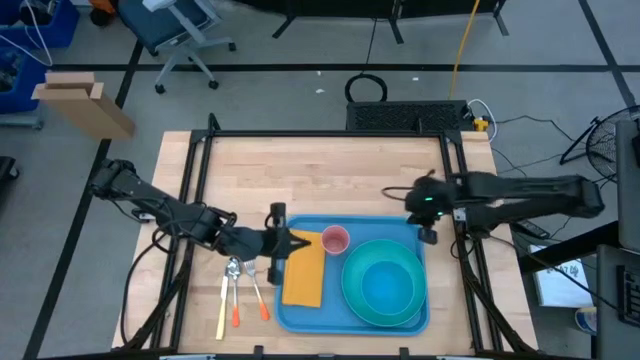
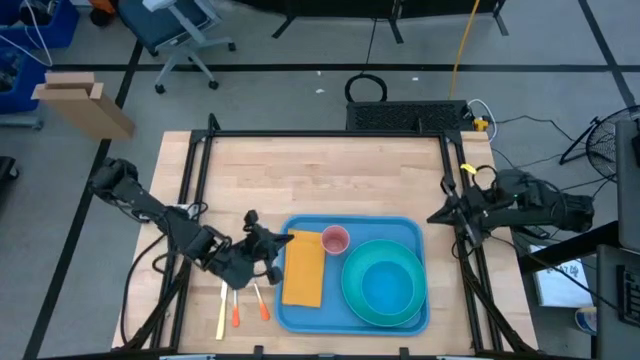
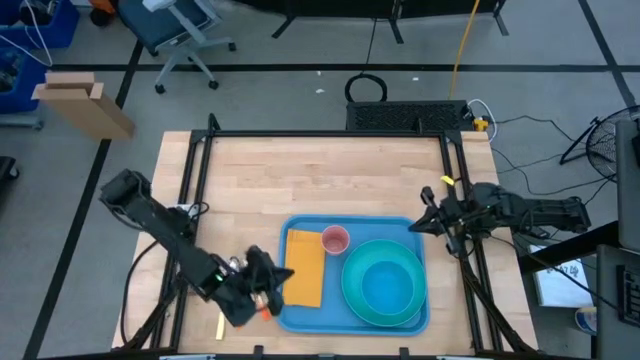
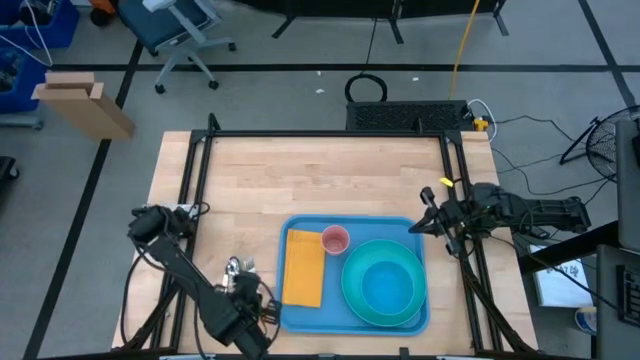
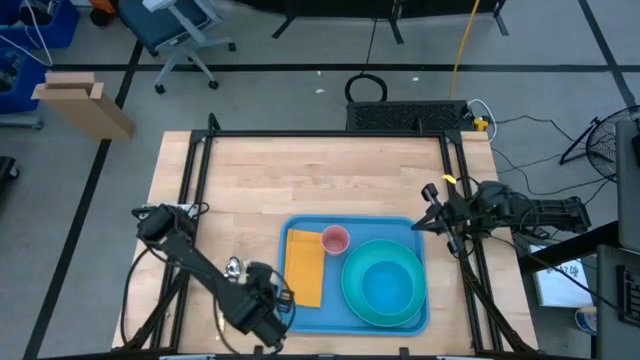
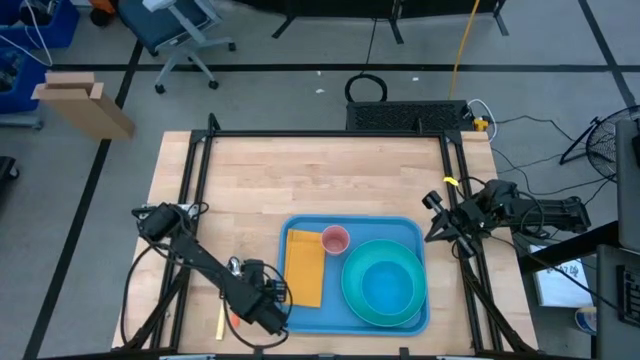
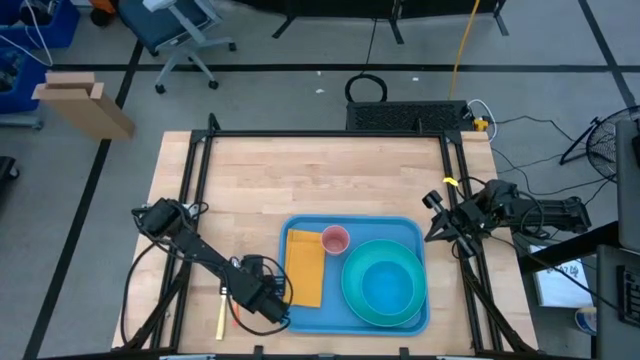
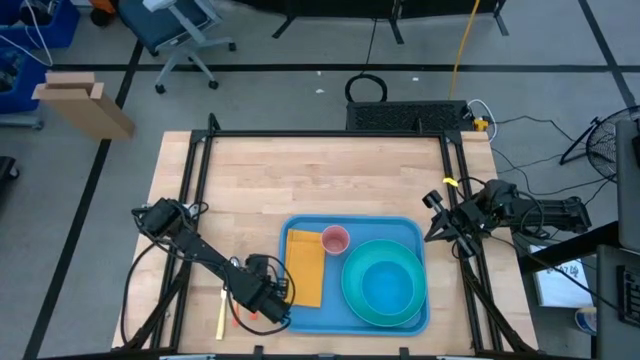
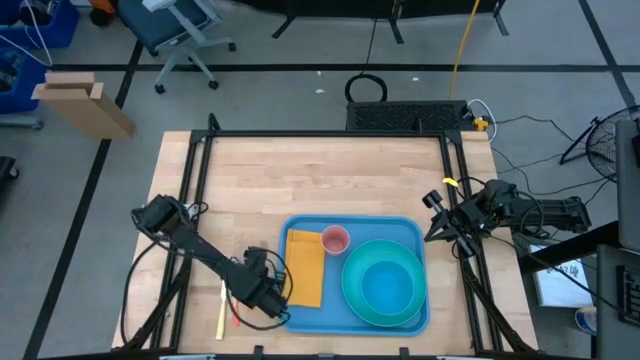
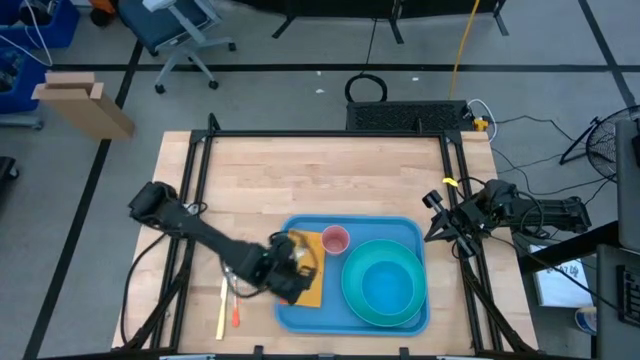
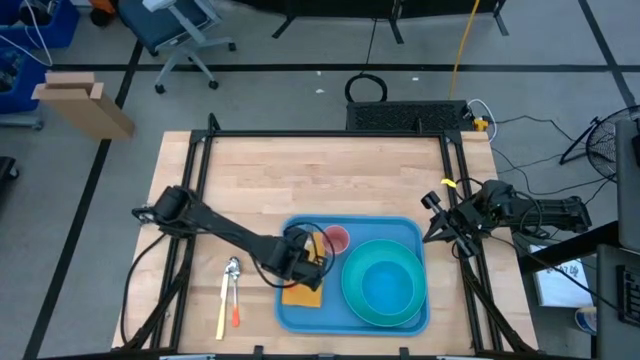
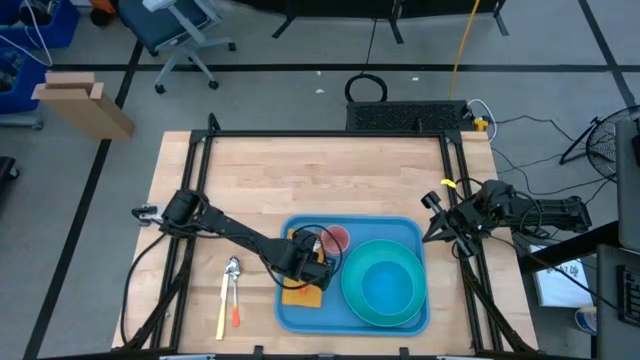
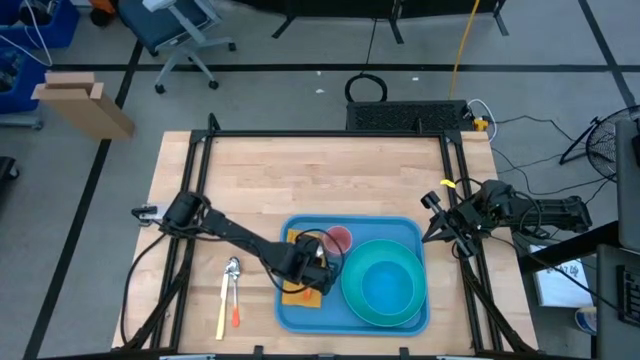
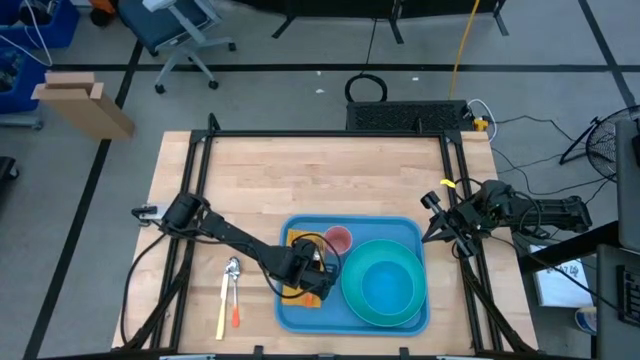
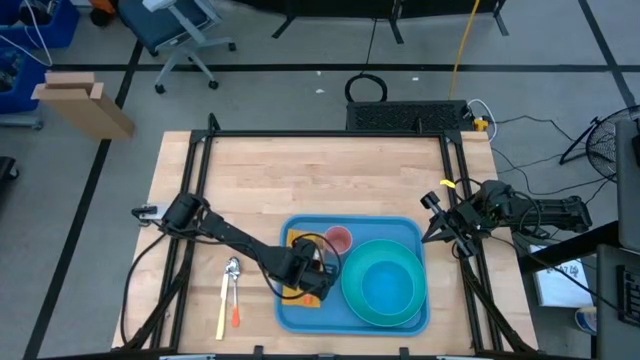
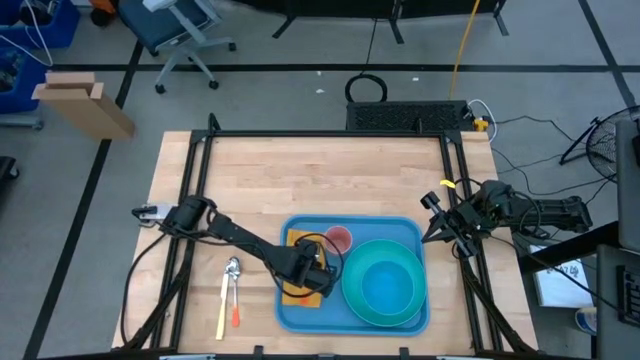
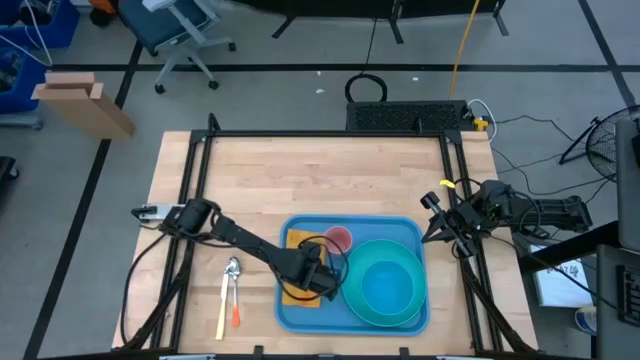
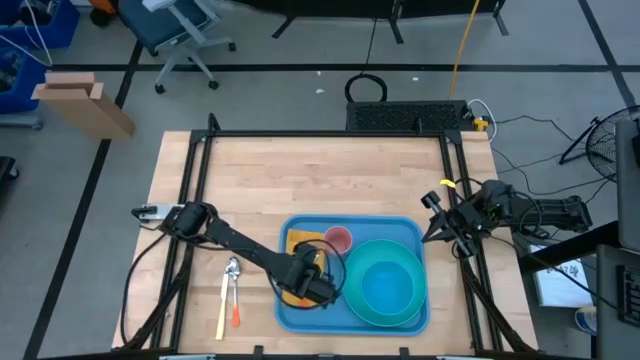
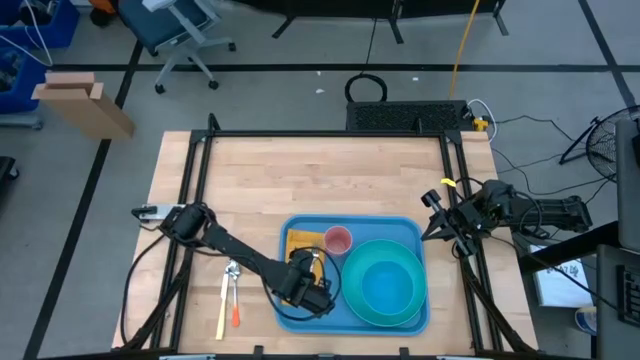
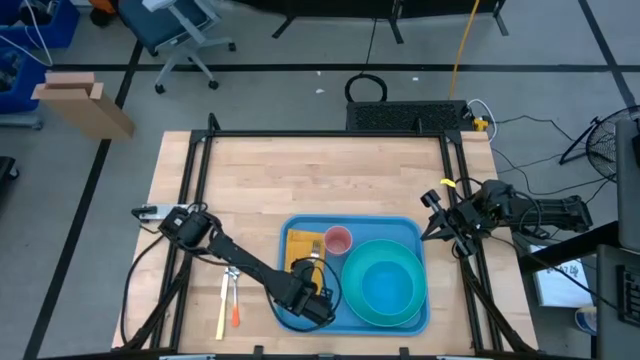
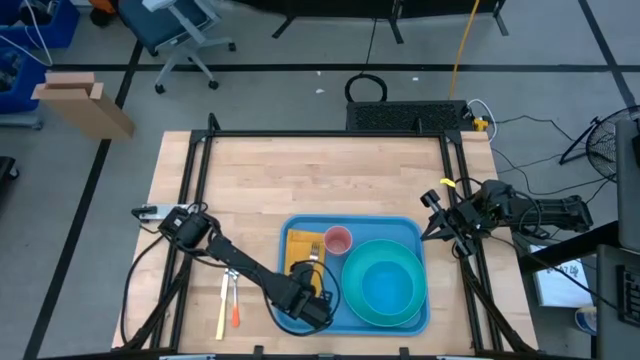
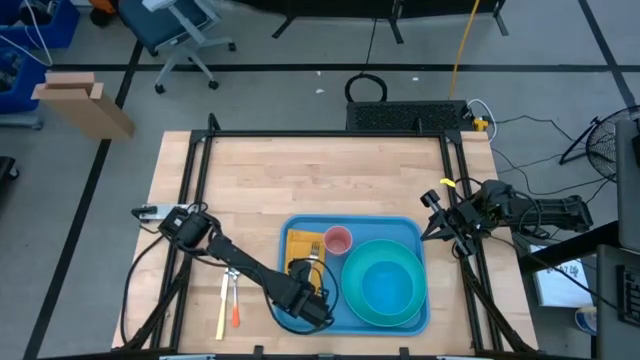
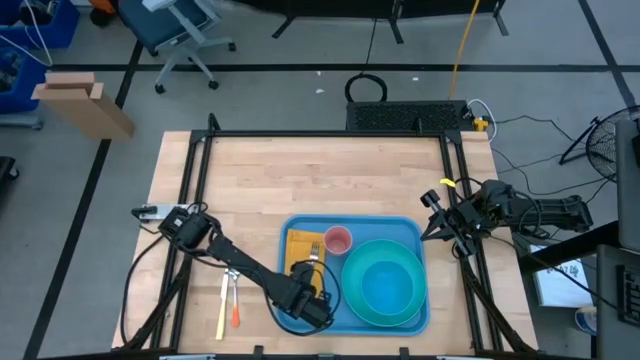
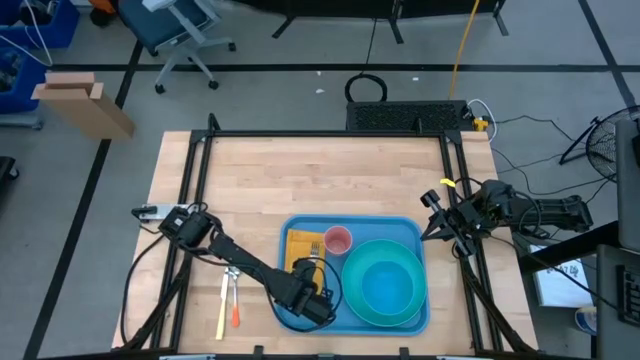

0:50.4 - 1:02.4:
Task: Set up tray
Put the orange fork on the yellow napkin

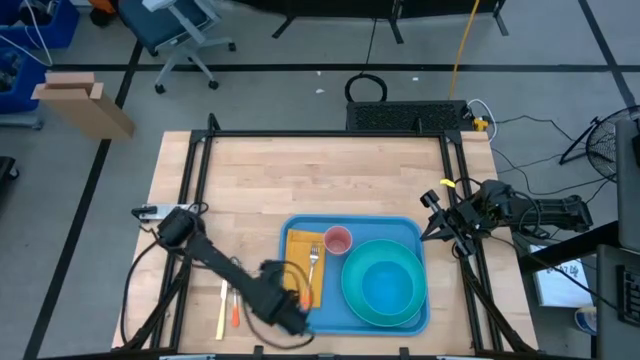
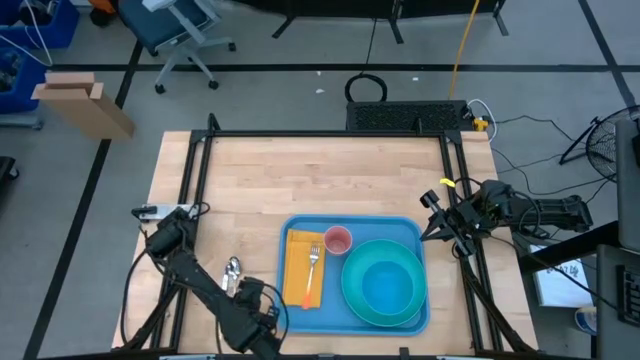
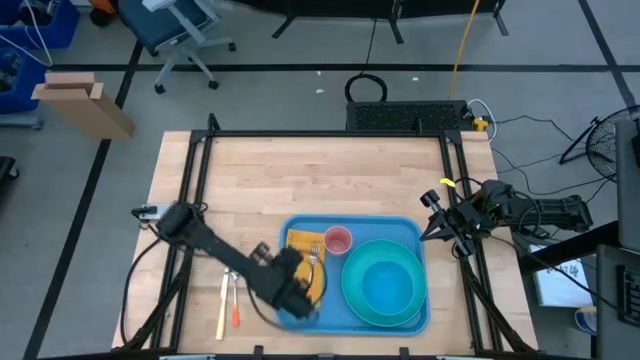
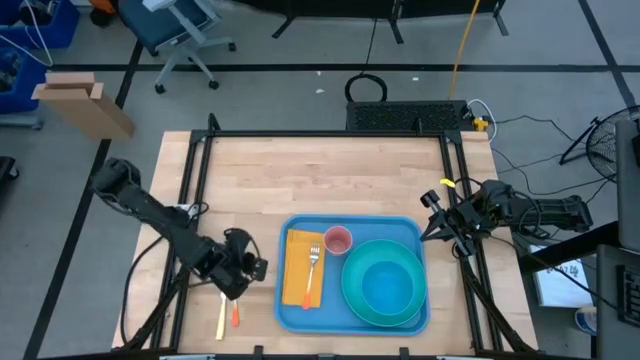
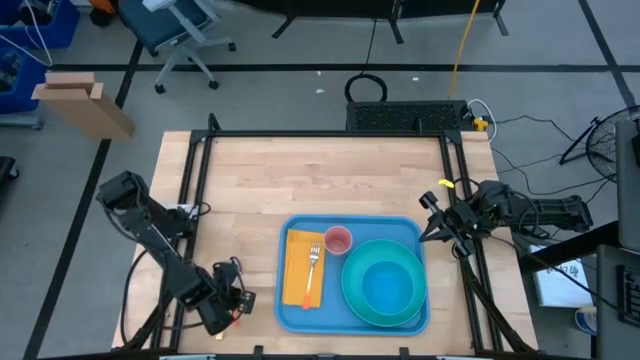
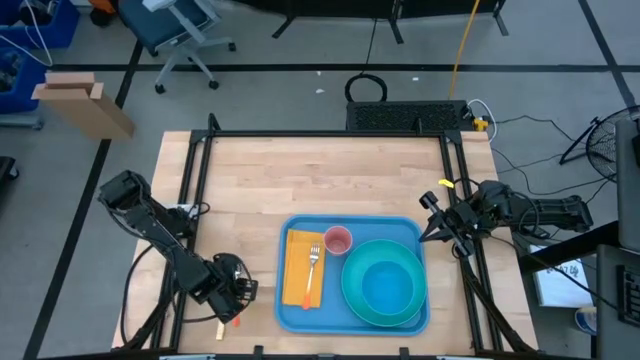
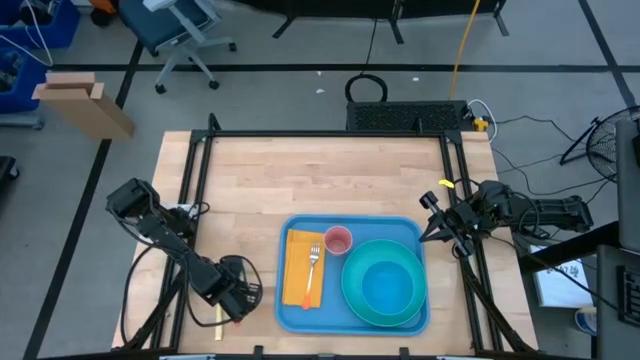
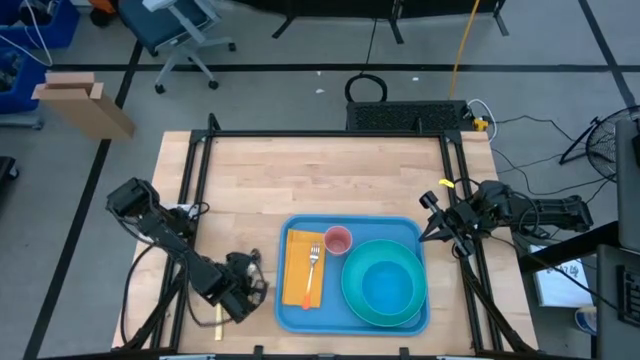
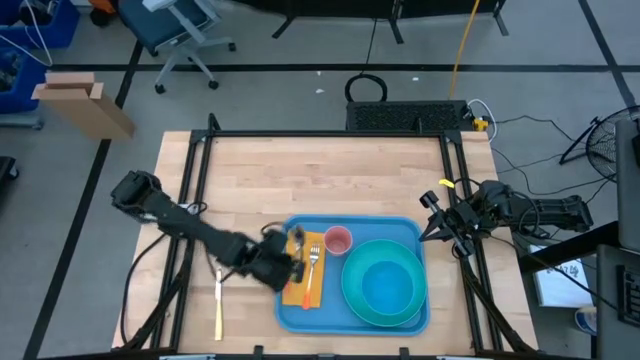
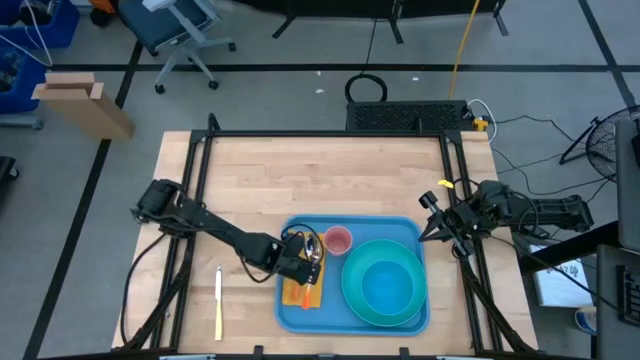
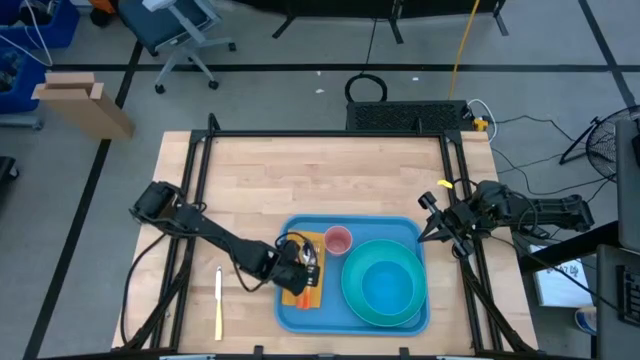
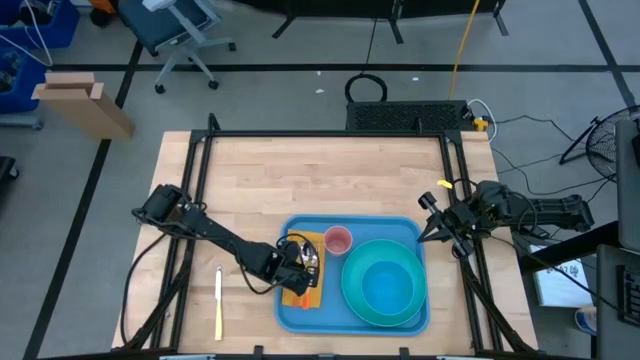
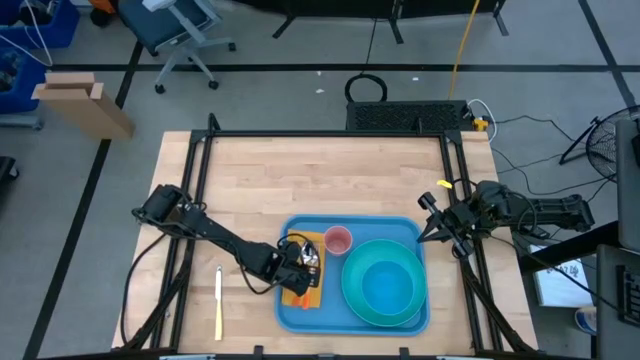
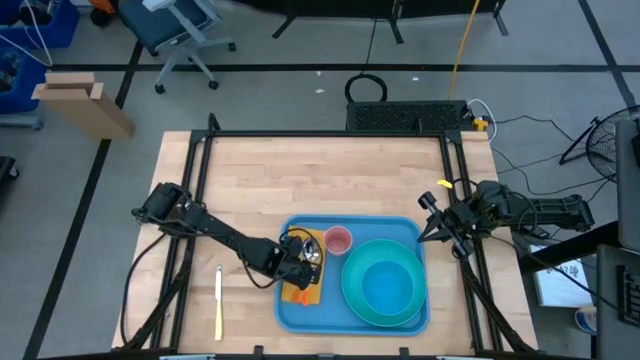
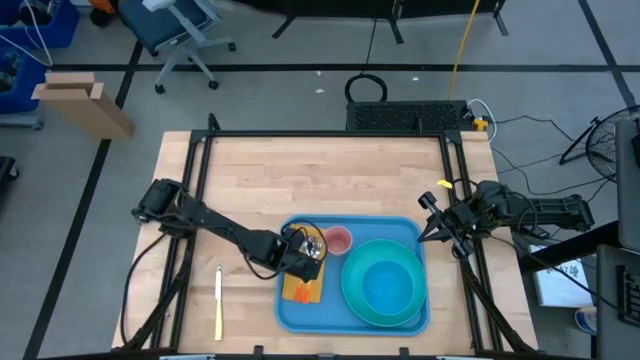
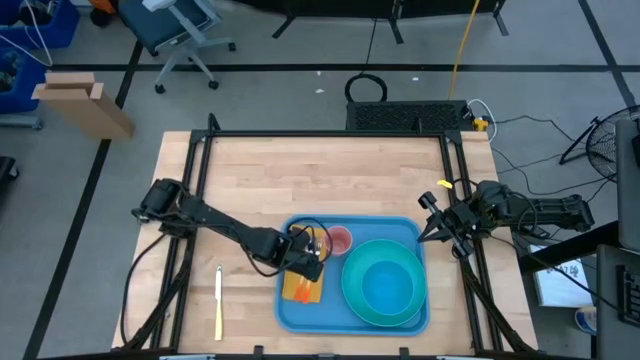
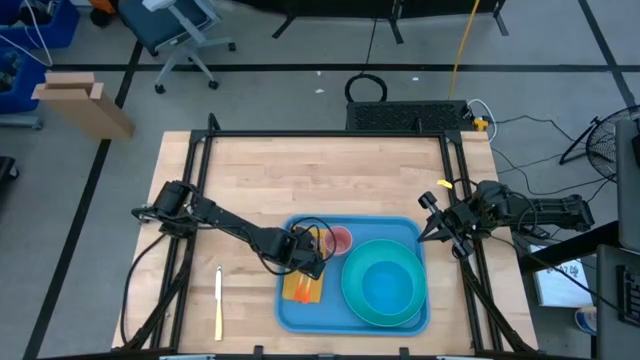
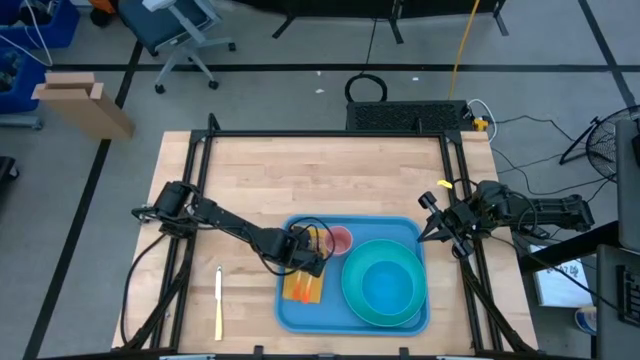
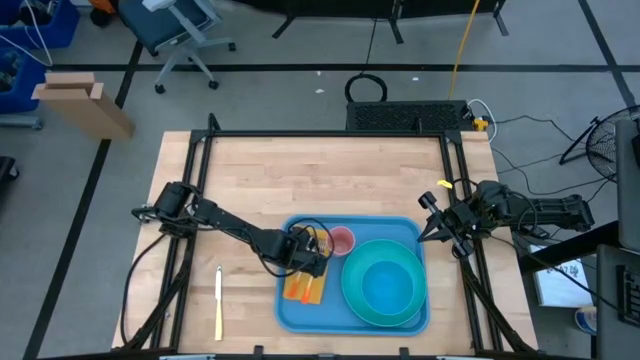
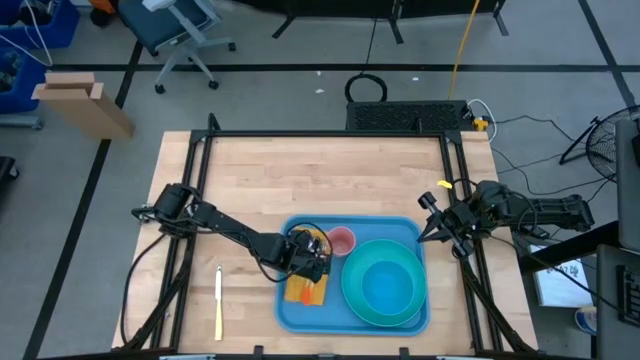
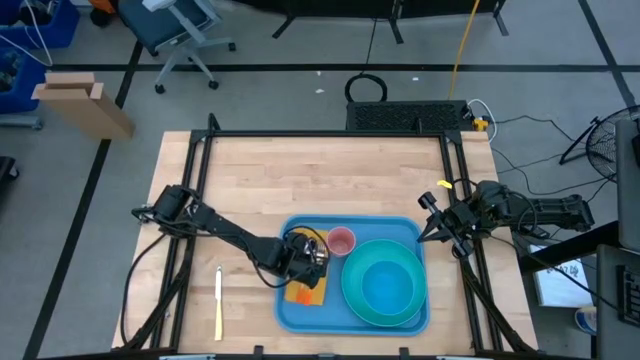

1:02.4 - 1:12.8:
Put the orange spoon on the yellow napkin, left of the orange fork
